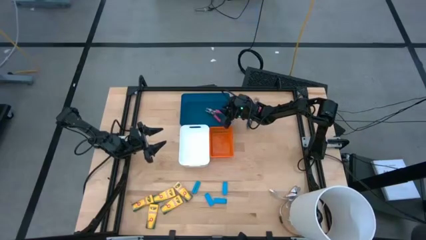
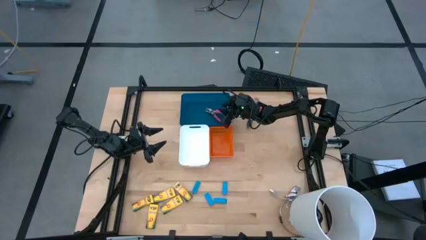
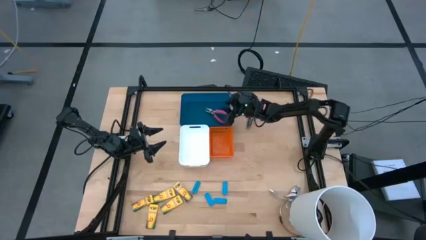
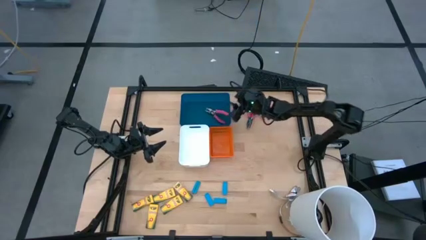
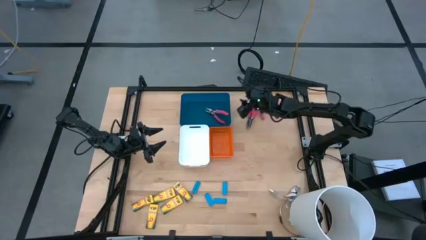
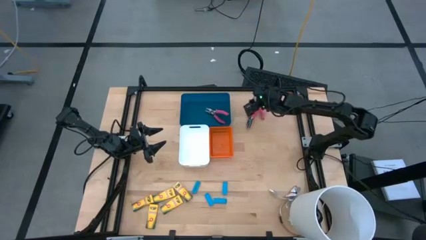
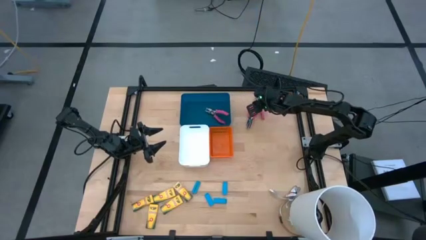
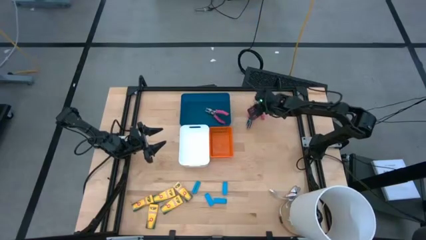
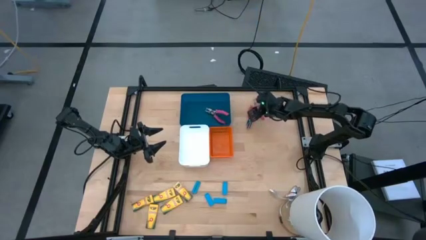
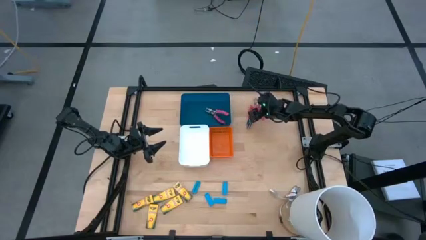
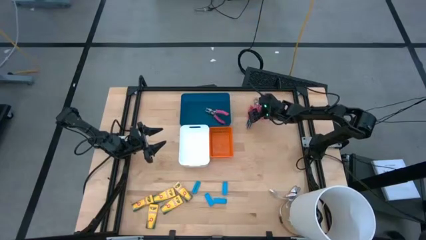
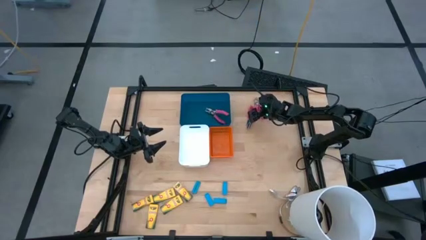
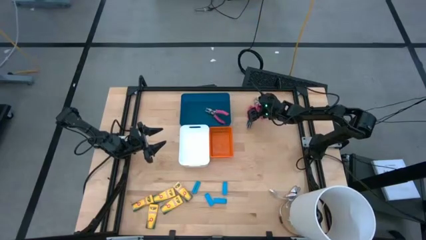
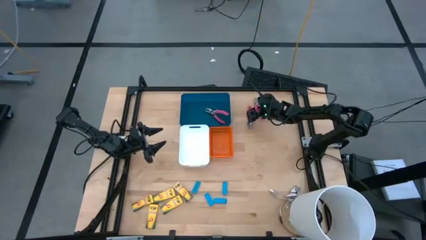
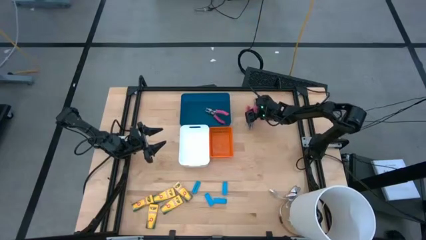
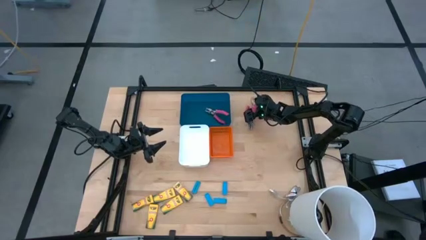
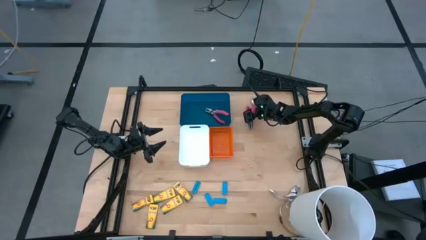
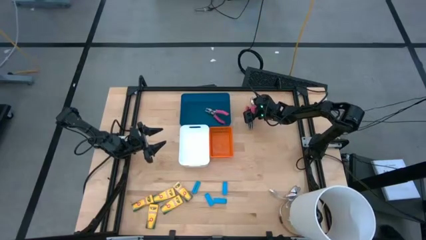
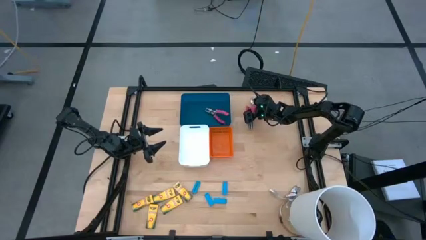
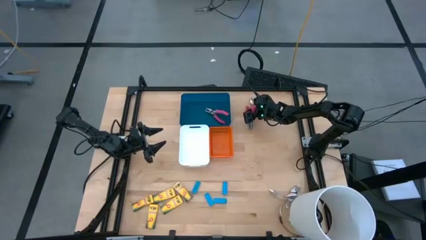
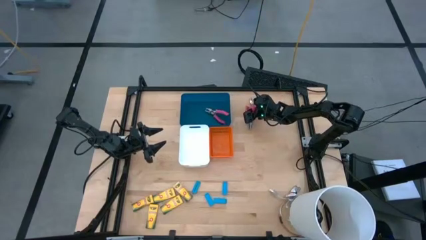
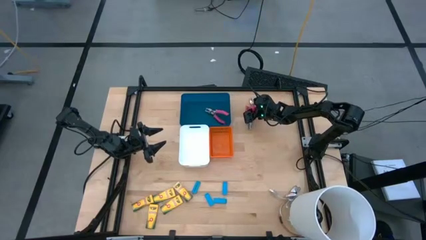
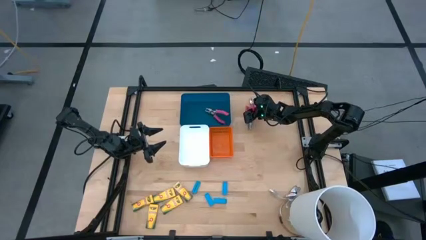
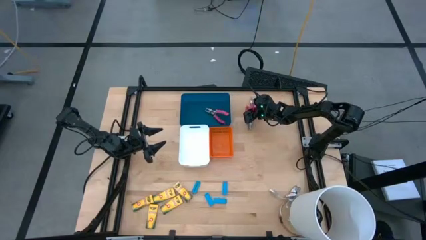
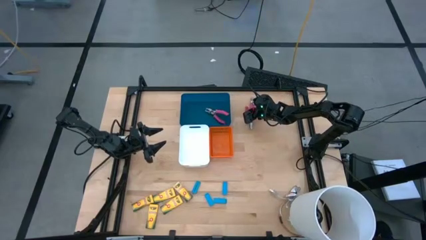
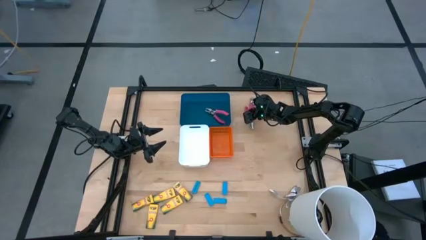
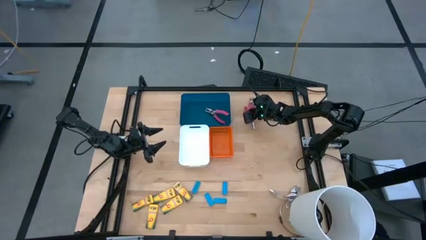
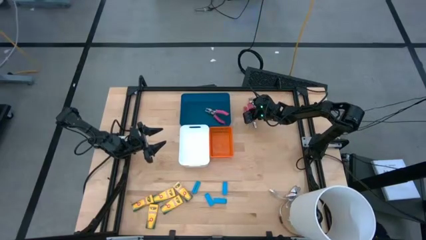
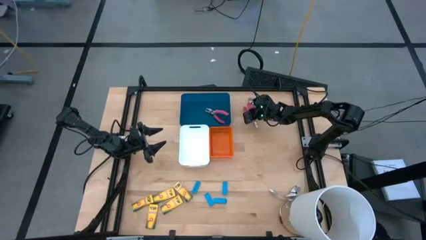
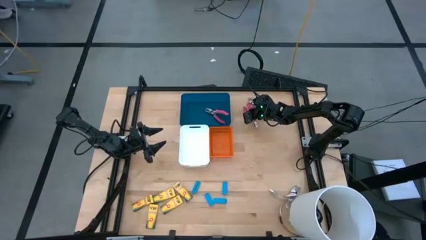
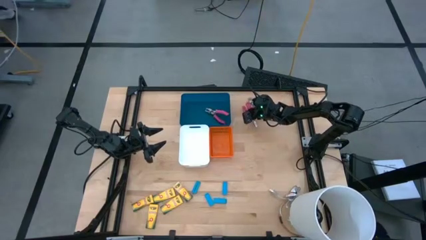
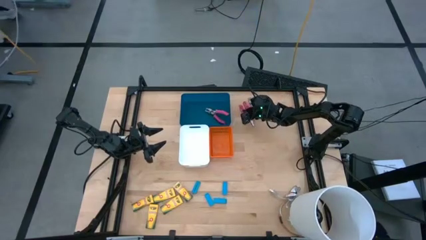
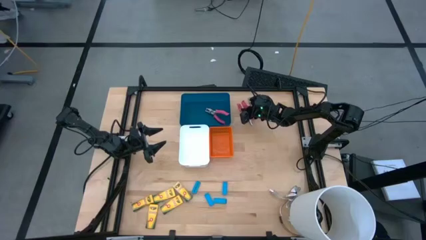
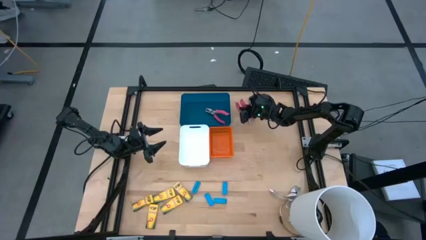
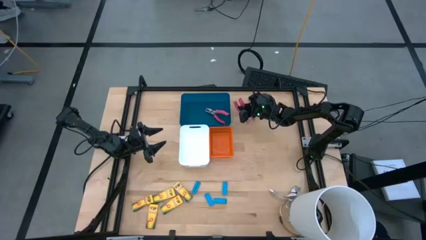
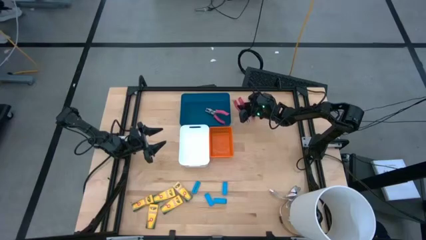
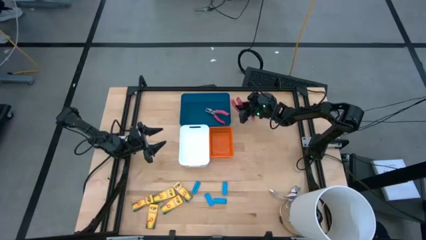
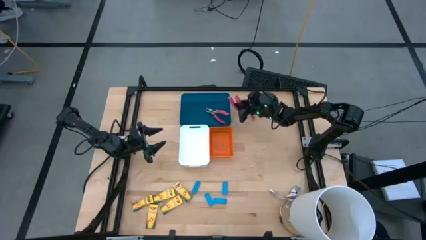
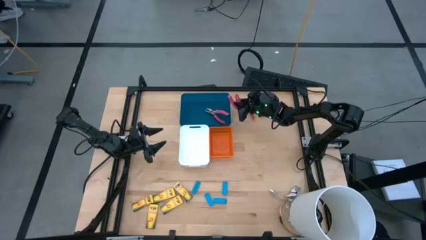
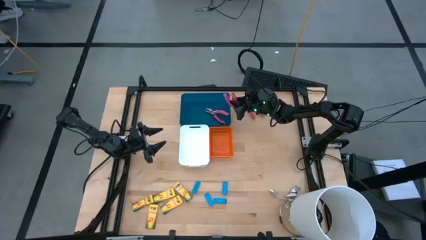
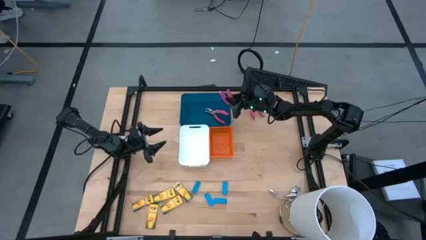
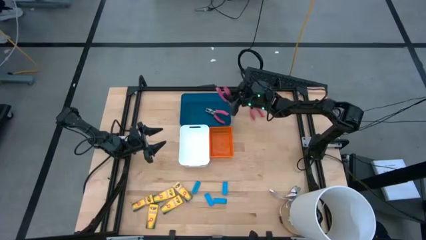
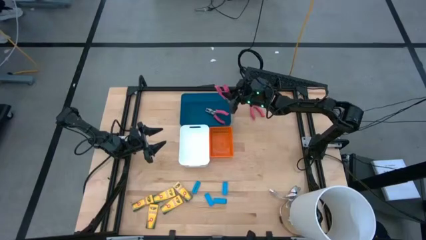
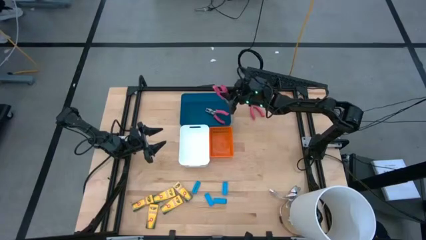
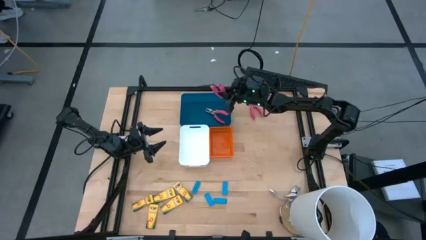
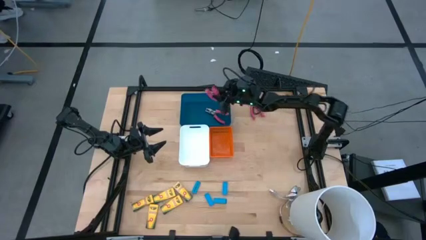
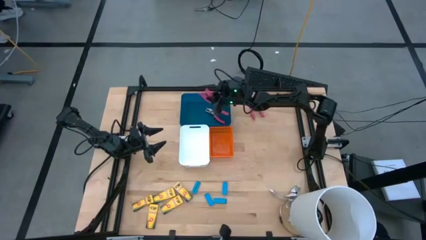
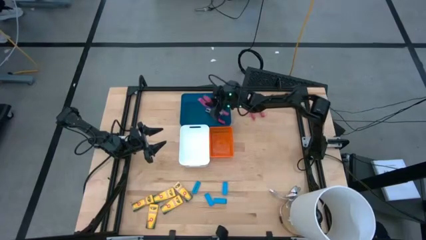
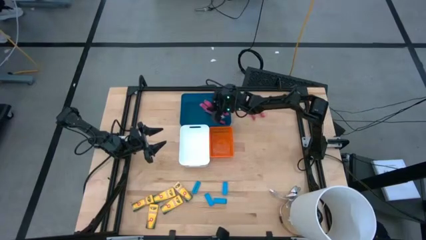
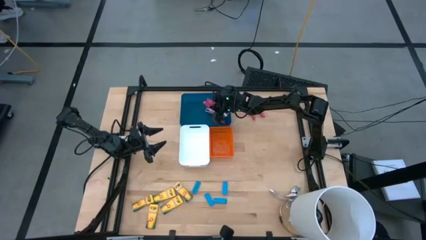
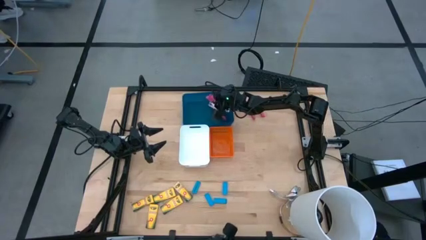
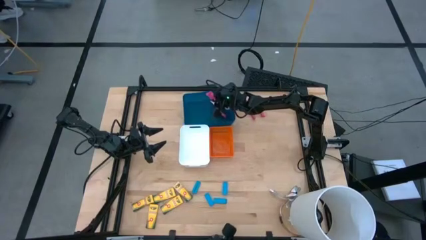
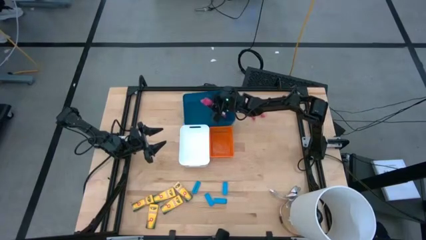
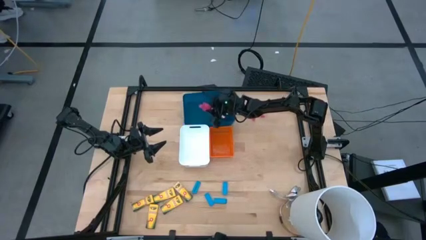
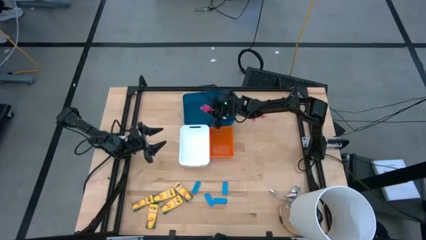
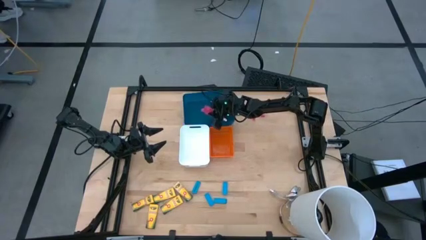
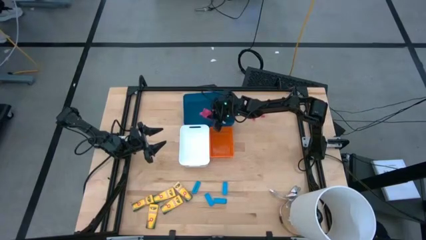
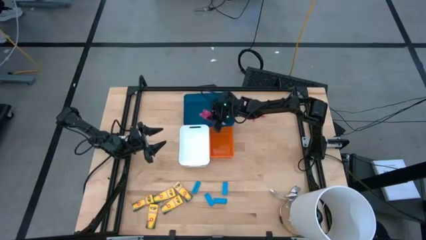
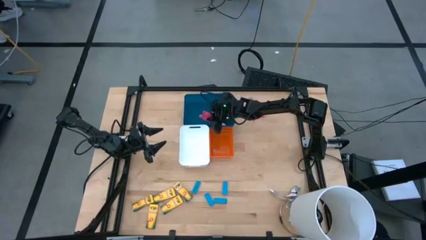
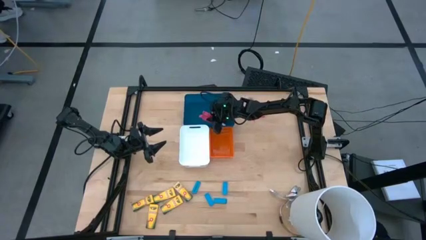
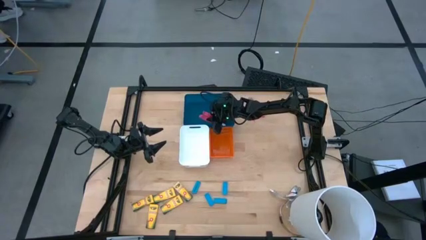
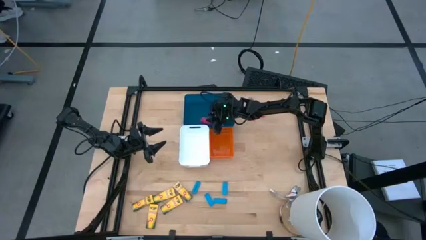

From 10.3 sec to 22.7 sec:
Task: Pick & Place School Supplies
Put the pink hole puncher into the blue bin

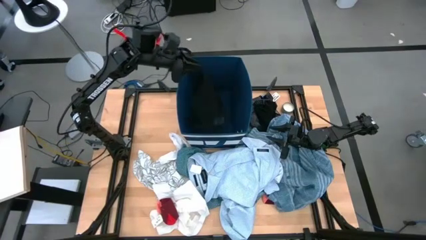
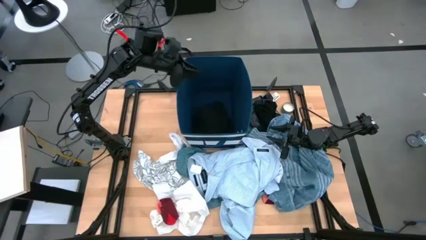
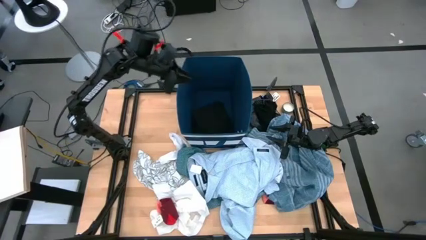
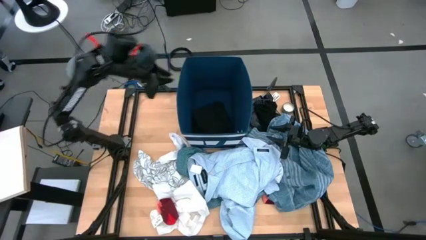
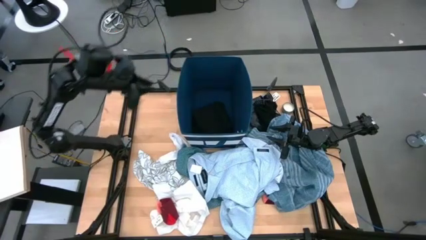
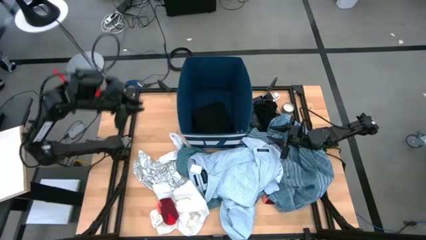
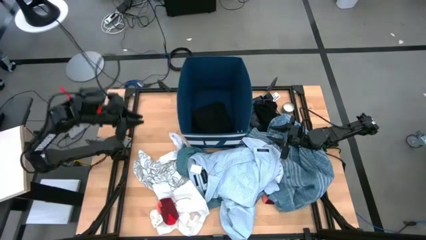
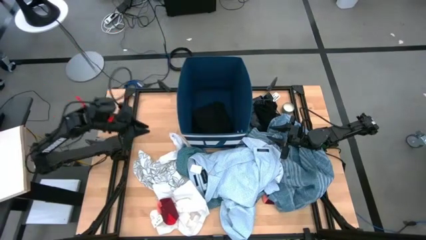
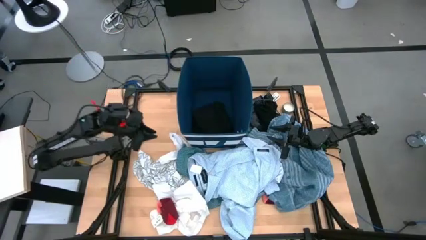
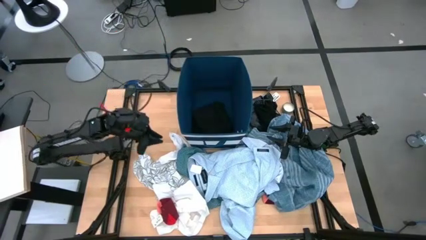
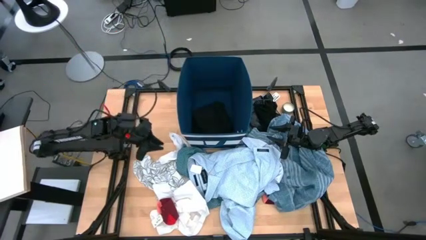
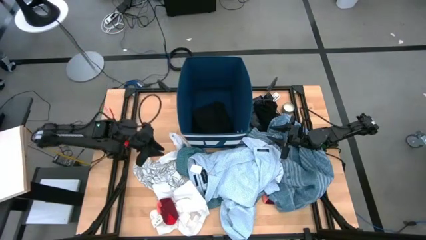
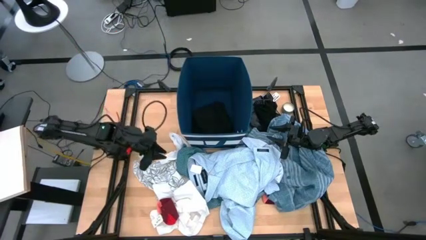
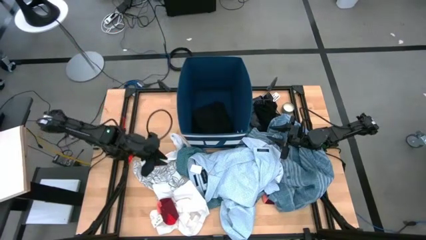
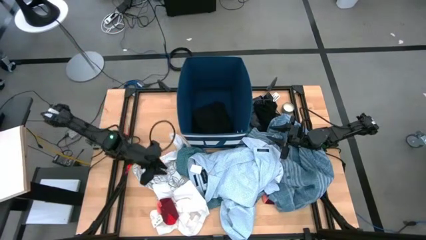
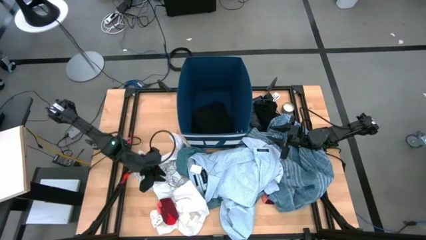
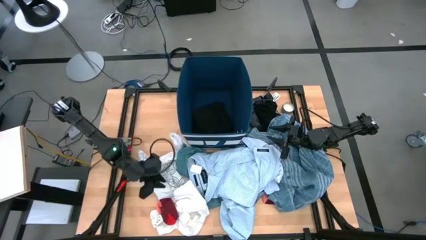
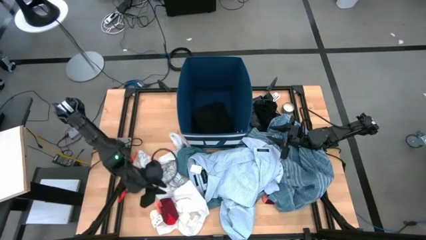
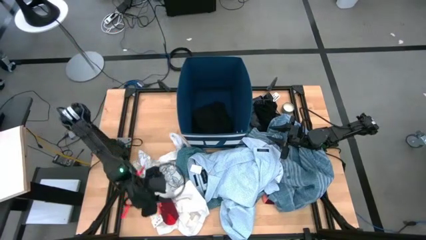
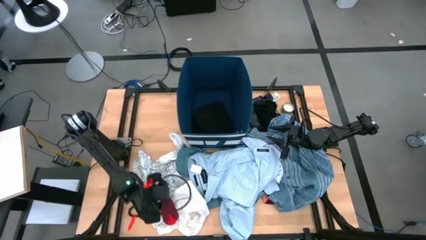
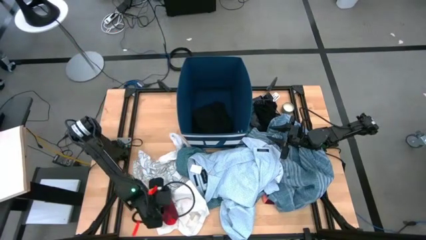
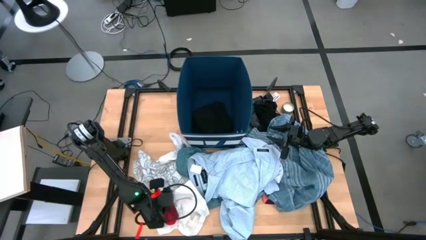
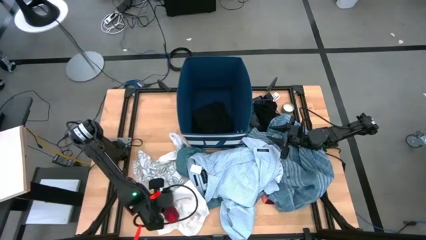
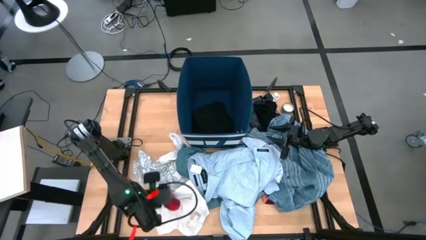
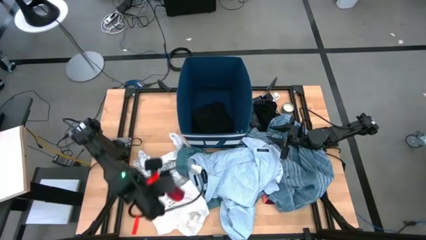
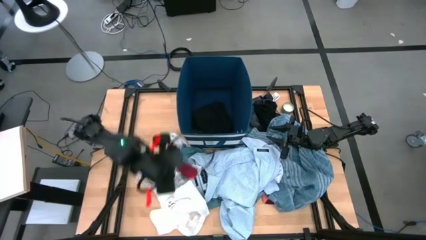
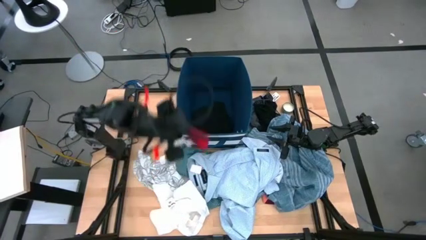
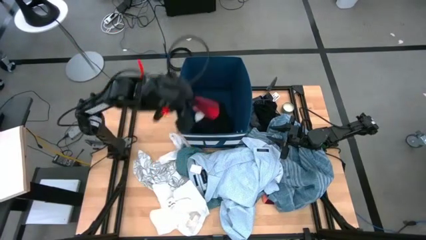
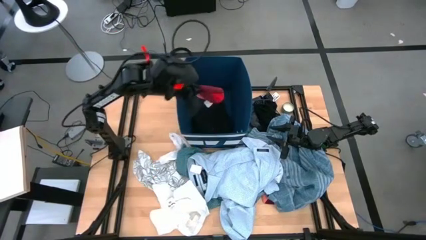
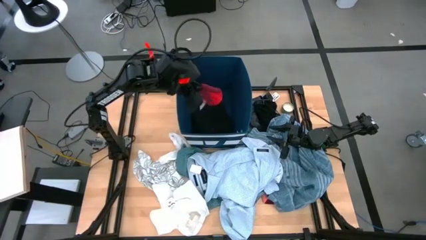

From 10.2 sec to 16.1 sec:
Task: Sort clothes
Put the left bottom red socks into the blue bin
